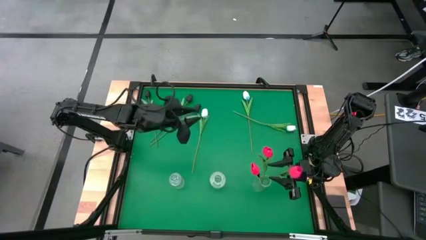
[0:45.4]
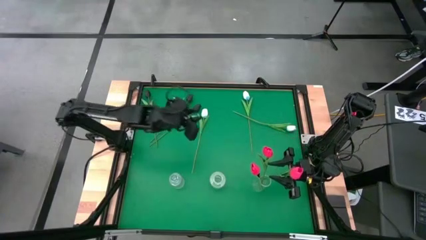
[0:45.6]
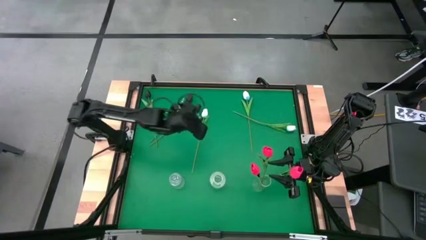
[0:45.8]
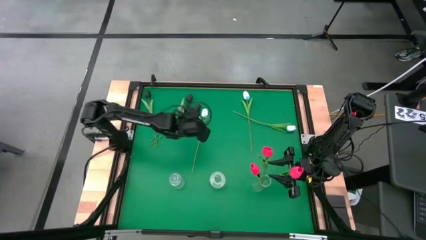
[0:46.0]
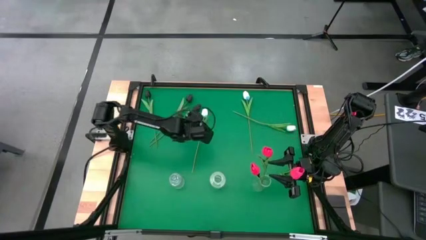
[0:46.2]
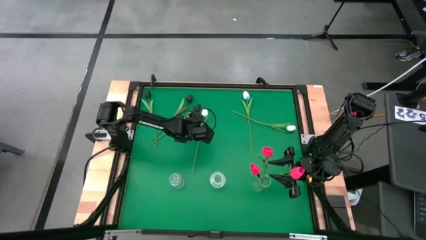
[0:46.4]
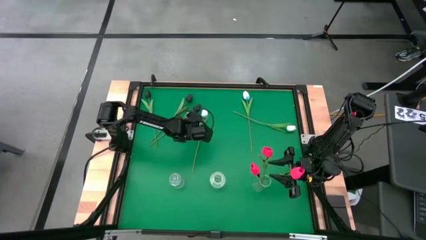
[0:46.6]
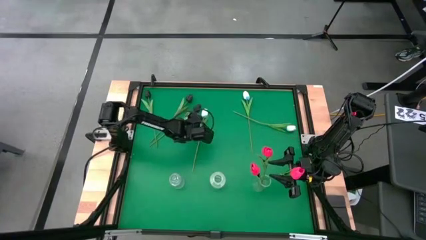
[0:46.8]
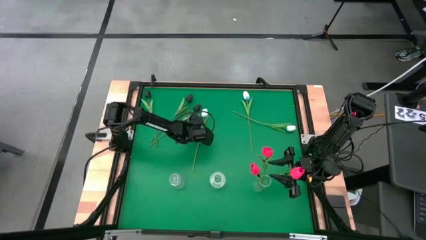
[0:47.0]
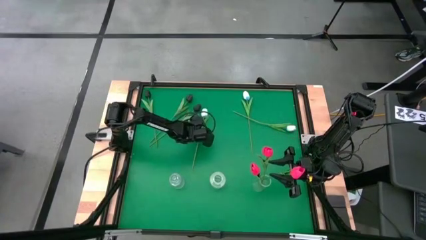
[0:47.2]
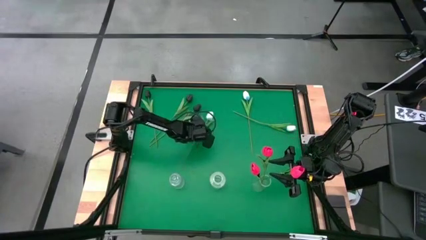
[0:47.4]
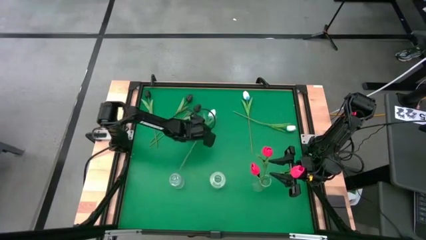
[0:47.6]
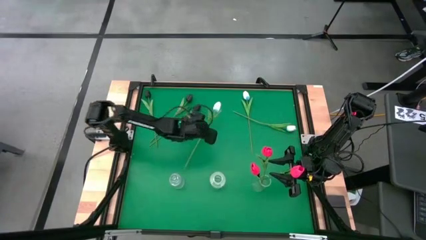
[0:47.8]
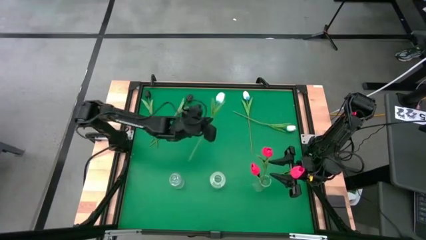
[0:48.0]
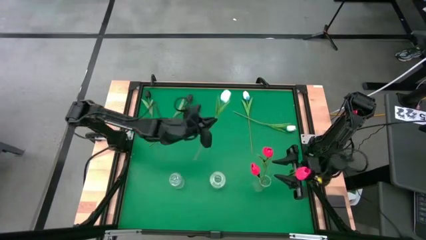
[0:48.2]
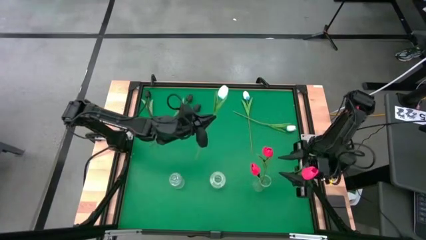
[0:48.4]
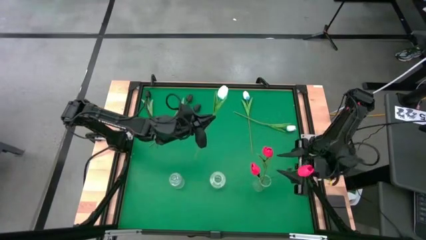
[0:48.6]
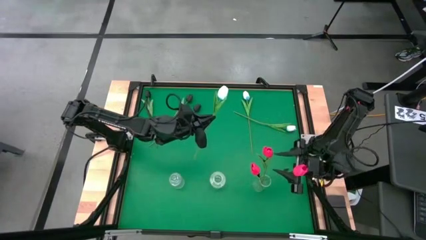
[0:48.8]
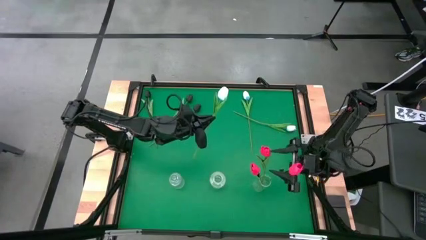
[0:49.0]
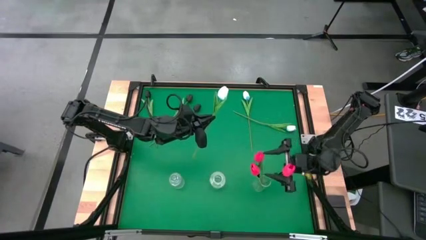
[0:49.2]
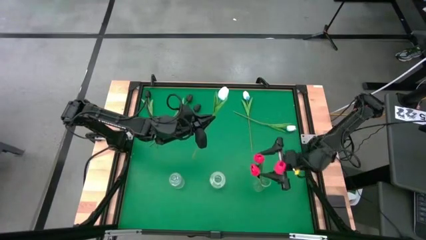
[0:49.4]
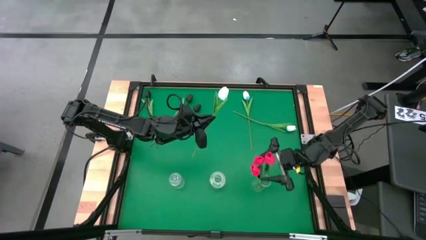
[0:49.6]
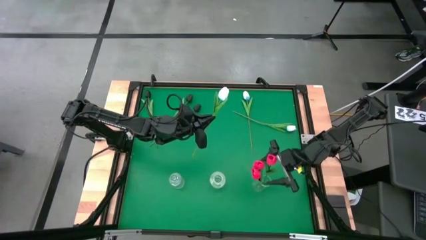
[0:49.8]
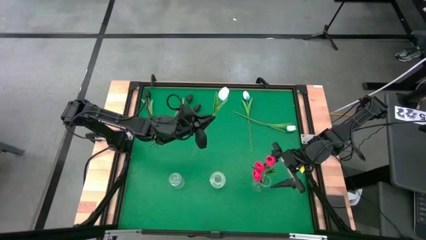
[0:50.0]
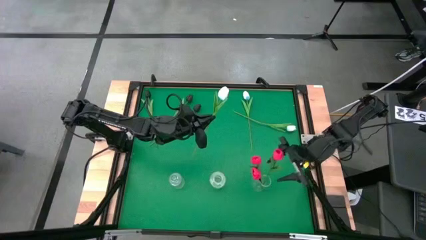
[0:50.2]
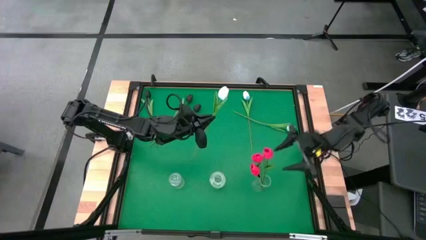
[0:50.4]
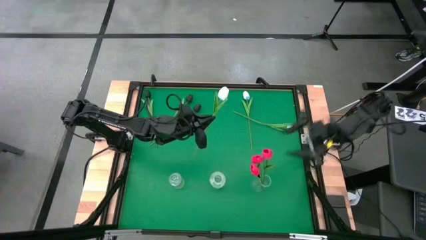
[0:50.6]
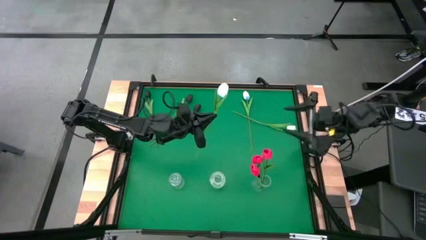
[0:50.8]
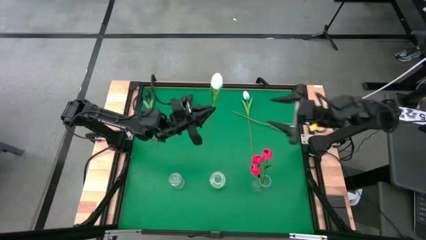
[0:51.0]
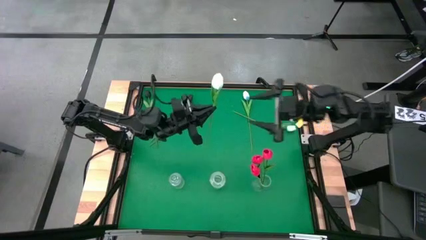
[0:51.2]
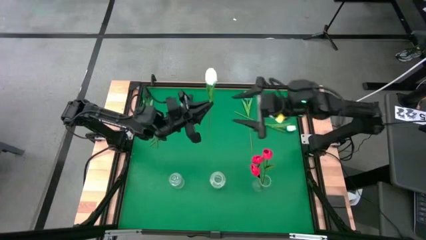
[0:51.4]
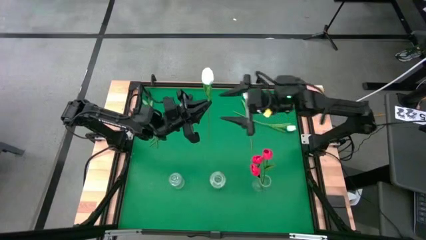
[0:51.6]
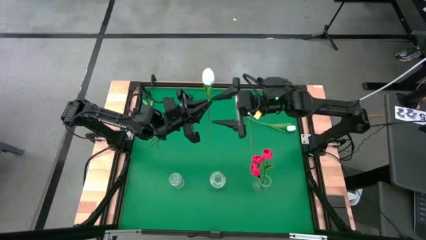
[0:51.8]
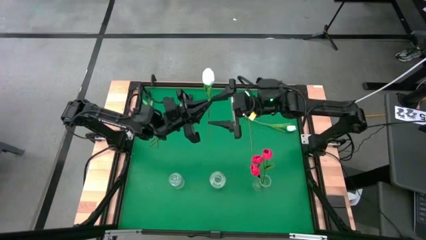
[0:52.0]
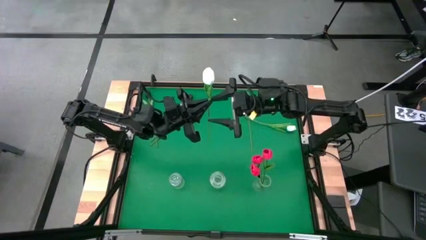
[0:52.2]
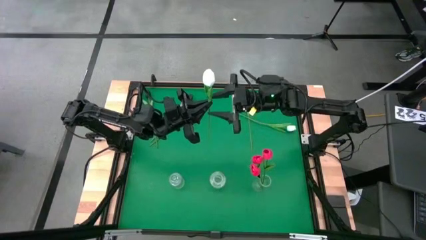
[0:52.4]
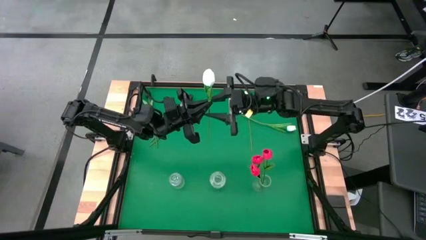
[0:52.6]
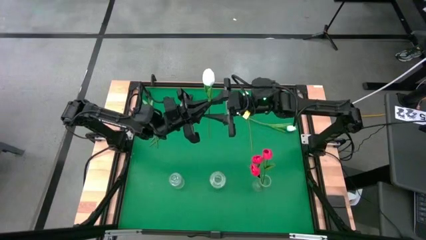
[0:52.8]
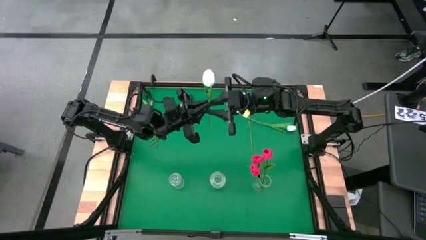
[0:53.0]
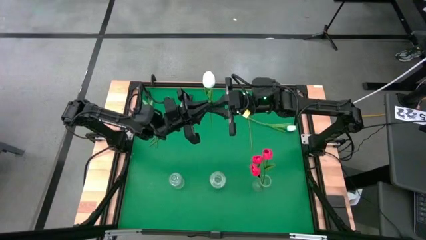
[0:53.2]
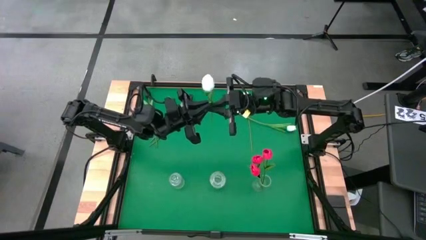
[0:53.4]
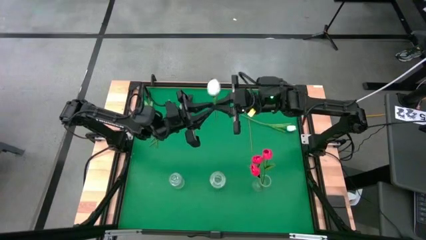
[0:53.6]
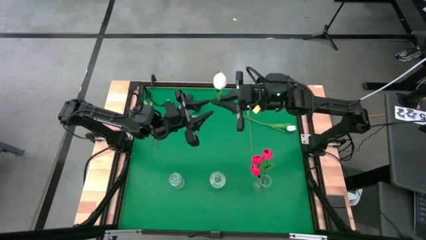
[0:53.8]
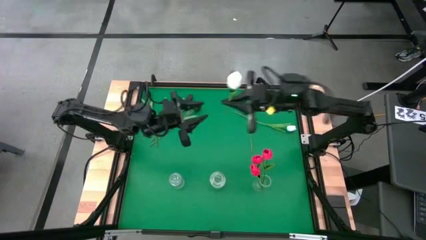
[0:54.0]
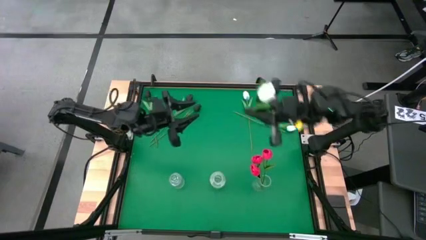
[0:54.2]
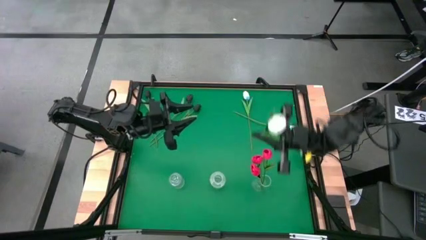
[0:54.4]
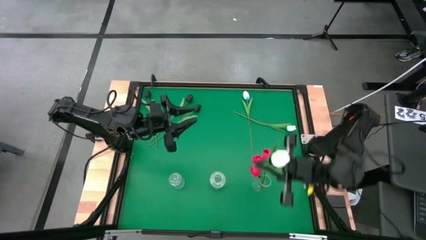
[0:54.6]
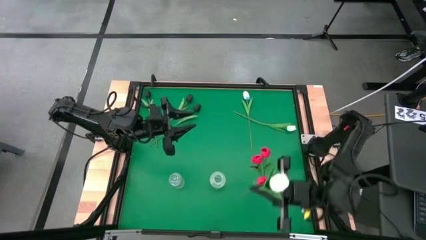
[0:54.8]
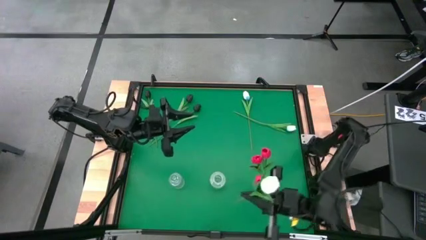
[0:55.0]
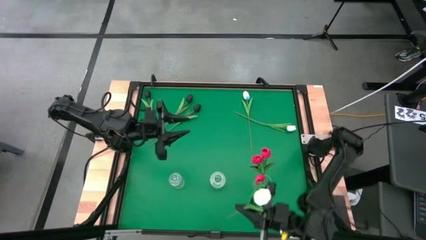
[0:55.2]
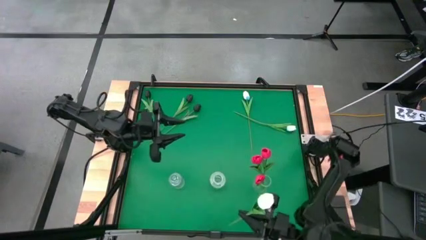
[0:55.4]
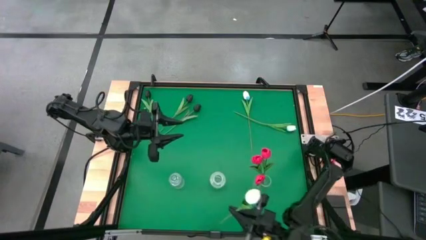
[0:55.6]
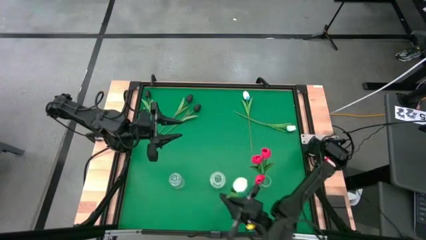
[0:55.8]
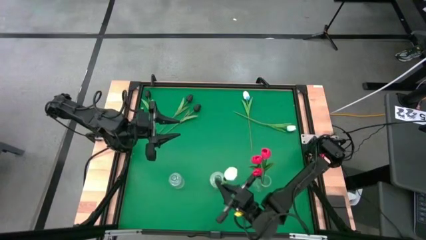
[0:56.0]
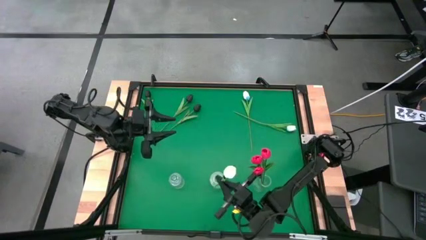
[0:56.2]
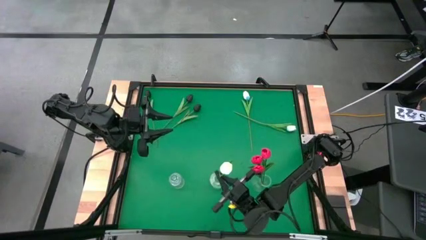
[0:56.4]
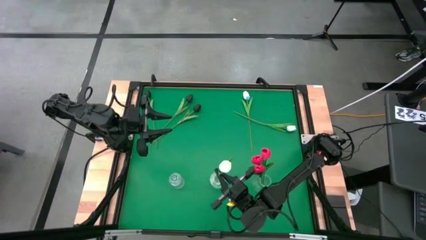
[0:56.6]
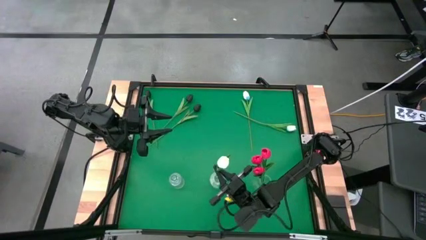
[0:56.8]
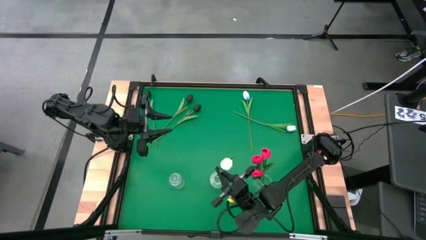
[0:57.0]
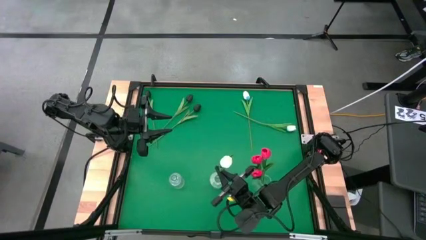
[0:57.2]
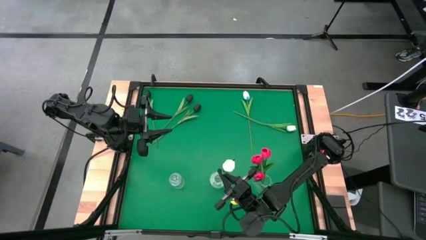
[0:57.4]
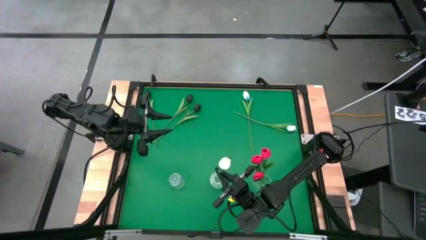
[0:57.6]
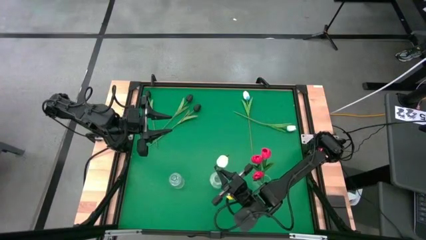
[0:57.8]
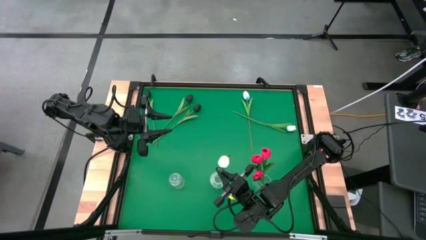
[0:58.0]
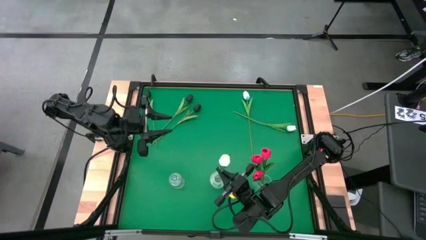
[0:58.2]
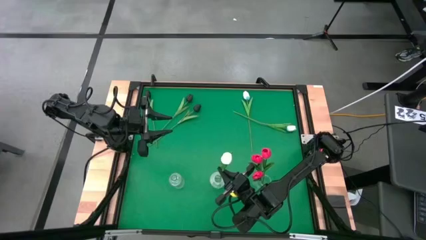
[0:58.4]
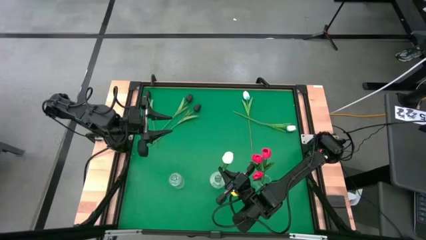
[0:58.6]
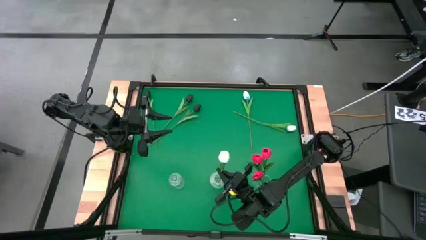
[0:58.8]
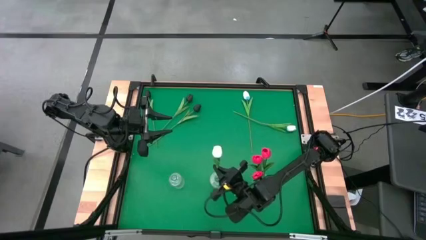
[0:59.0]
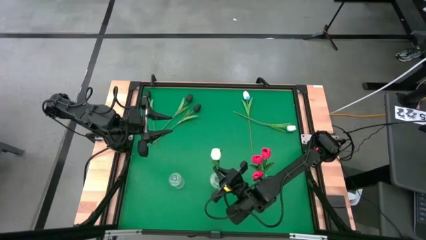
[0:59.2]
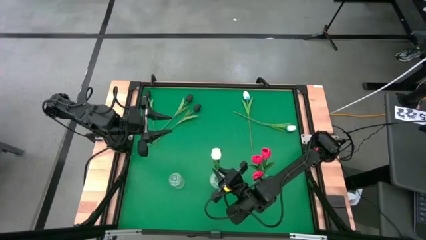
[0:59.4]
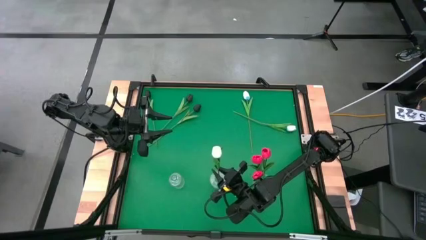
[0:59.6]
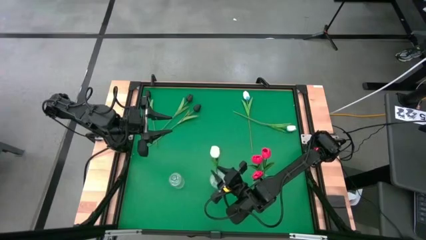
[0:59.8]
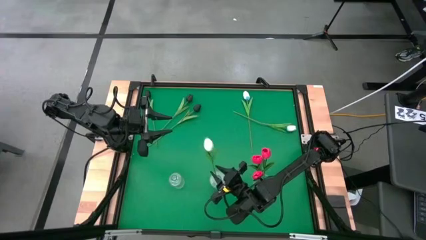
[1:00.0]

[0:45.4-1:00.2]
Task: Sort flowers into vase by color
Put the top center white tulip into the middle transparent vase

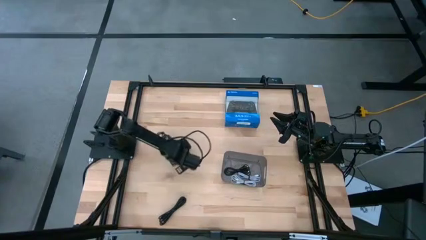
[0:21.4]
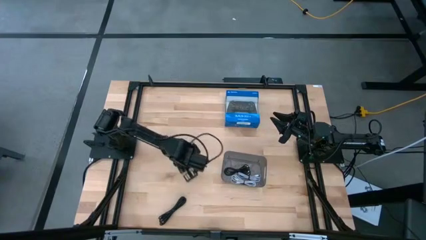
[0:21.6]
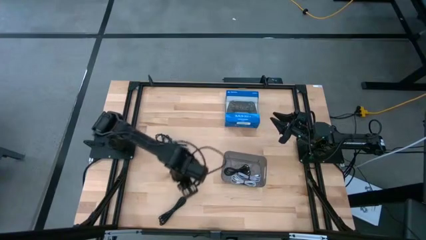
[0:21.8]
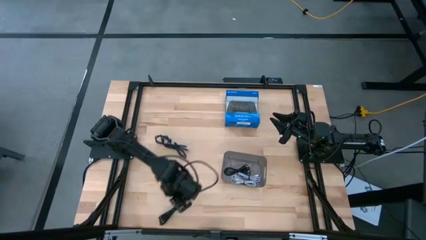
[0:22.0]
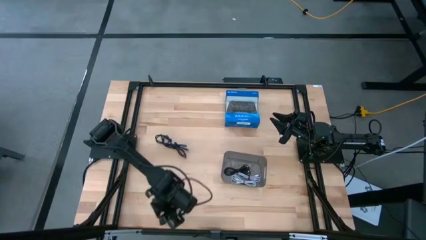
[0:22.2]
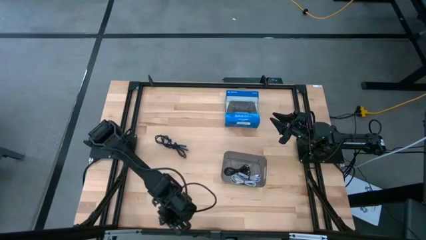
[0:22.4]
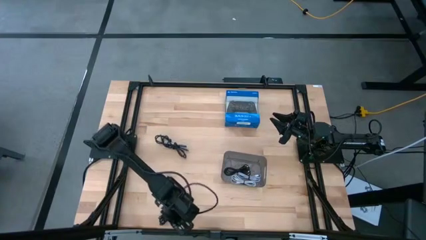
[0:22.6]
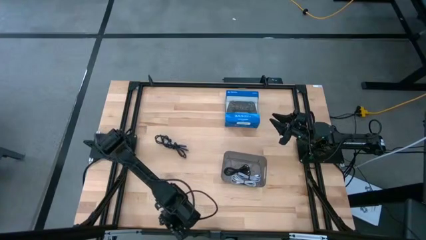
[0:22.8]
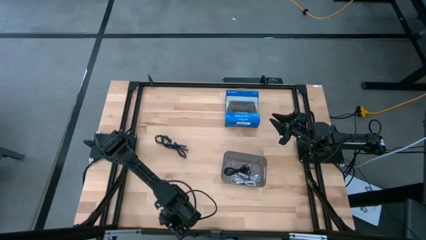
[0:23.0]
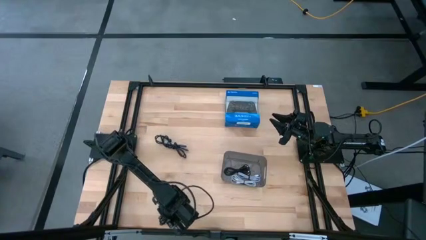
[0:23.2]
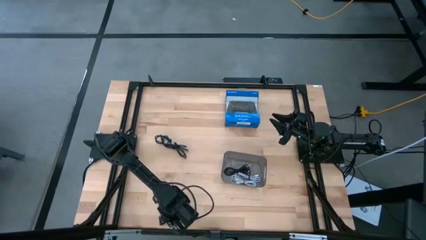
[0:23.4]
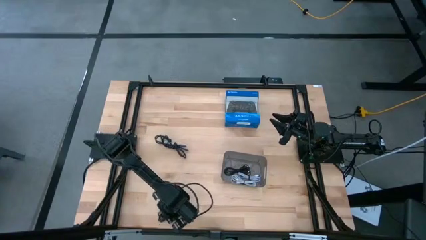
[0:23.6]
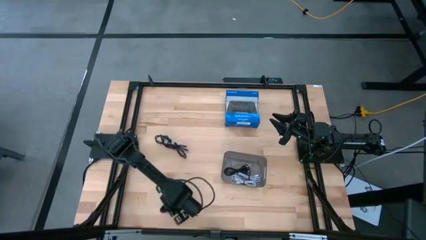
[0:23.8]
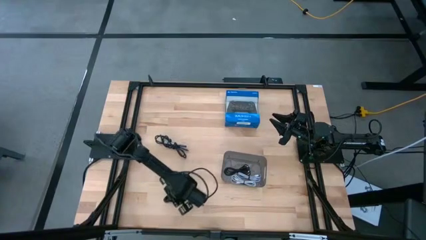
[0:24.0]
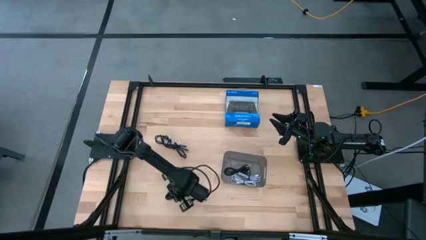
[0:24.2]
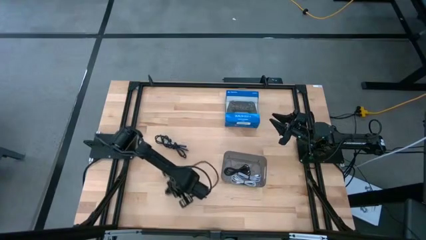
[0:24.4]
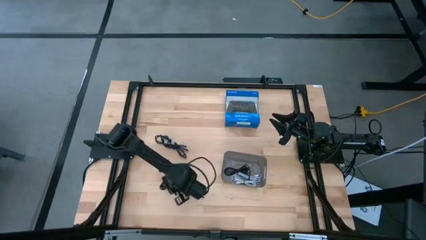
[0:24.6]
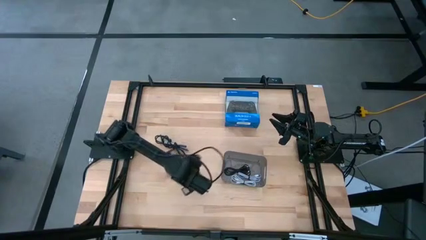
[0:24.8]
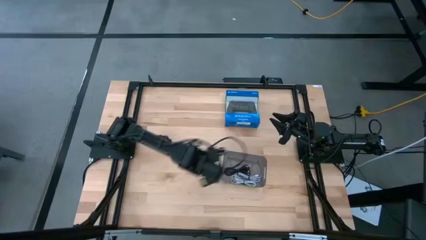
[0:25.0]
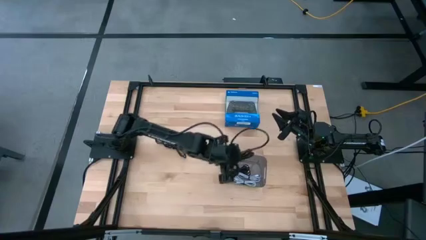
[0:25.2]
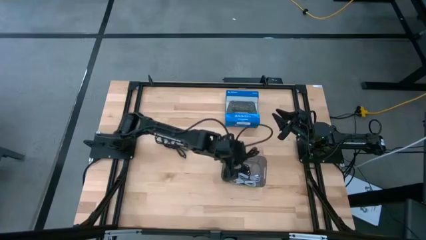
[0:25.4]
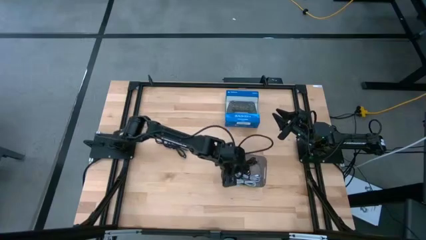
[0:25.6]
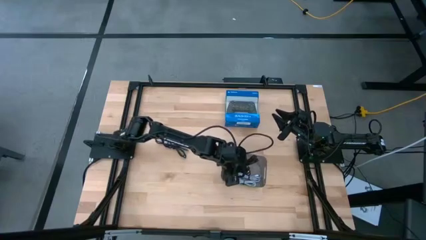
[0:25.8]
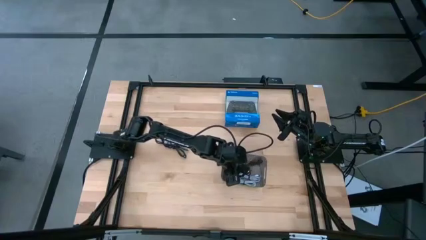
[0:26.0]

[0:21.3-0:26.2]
Task: Pick and place USB-C Cables
Put the bottom black charger cable into the black bin
